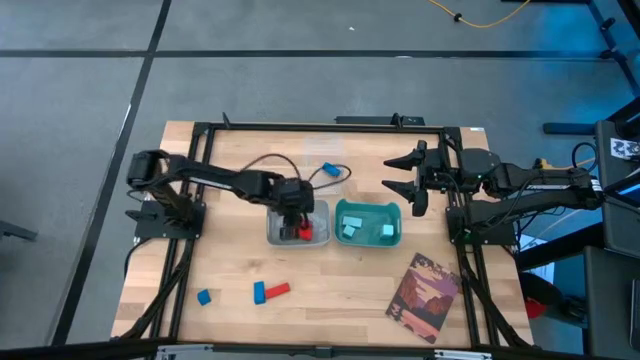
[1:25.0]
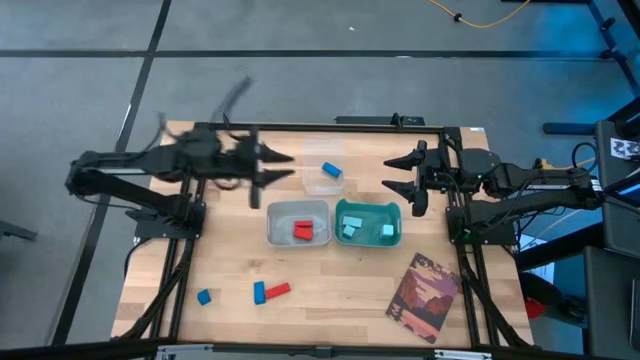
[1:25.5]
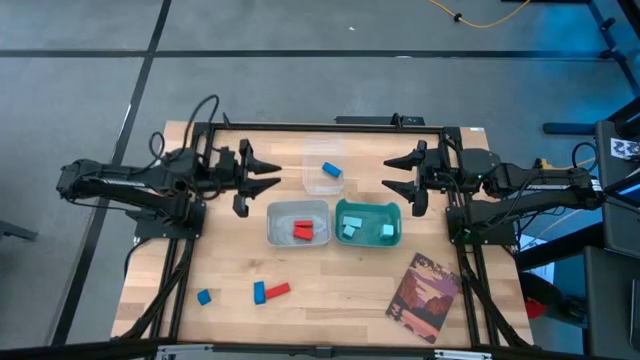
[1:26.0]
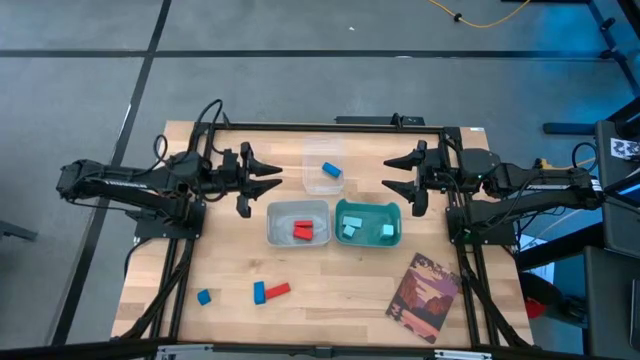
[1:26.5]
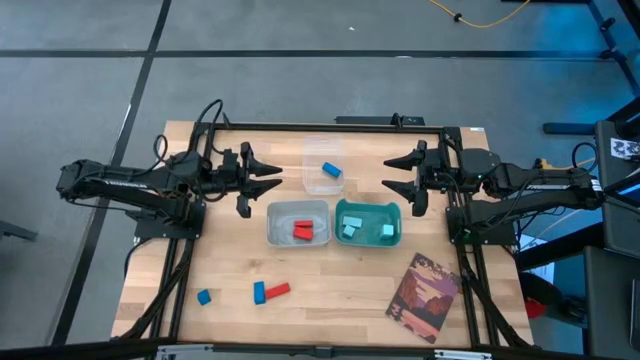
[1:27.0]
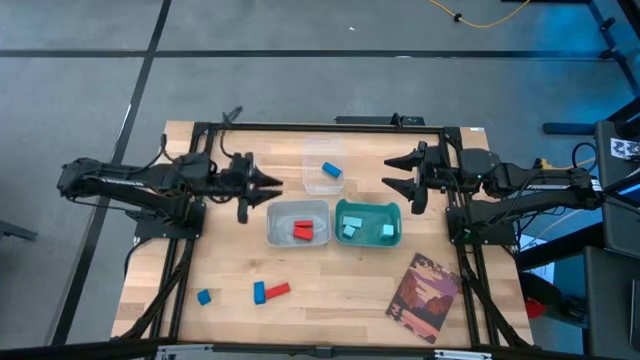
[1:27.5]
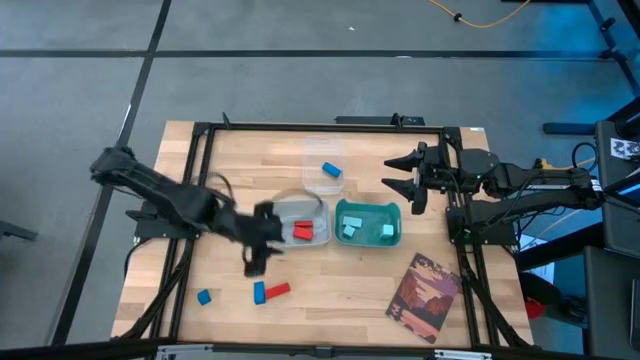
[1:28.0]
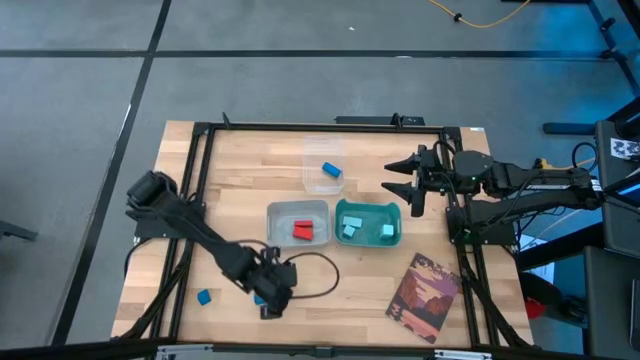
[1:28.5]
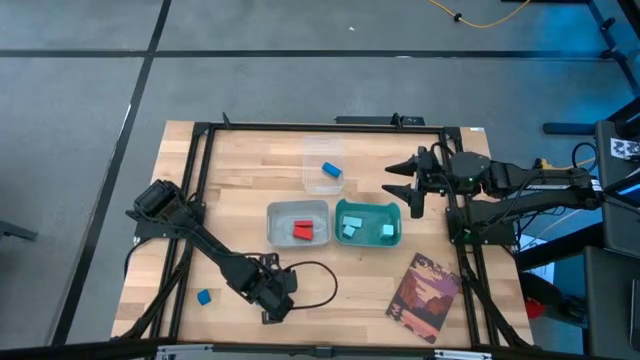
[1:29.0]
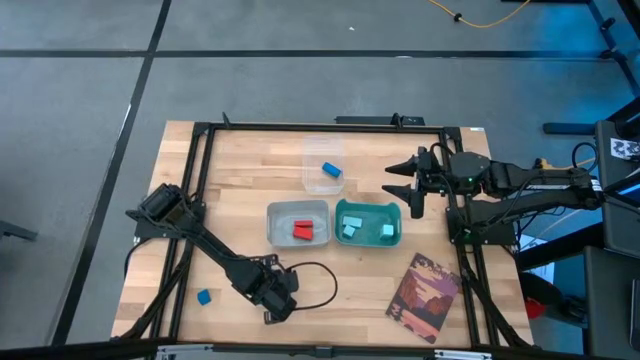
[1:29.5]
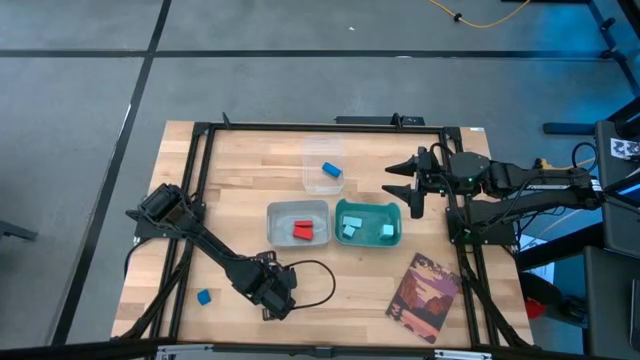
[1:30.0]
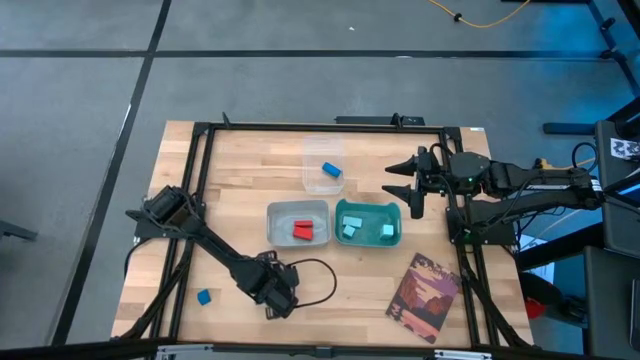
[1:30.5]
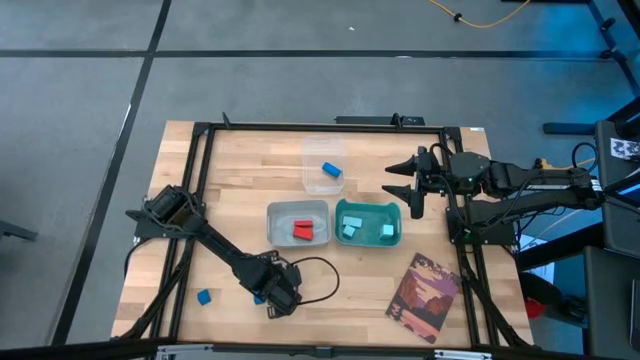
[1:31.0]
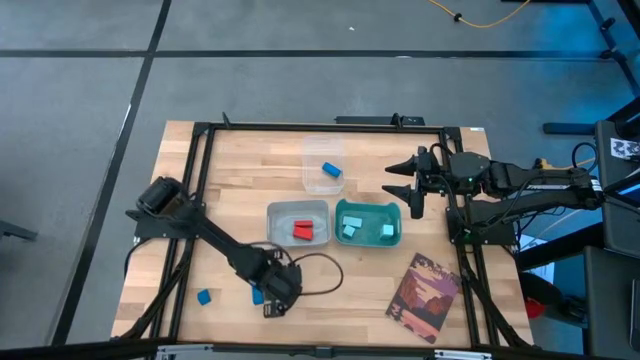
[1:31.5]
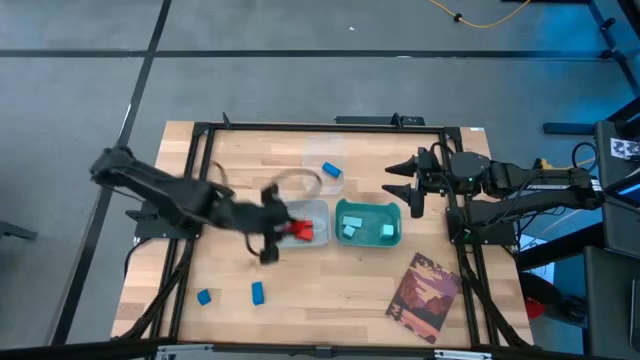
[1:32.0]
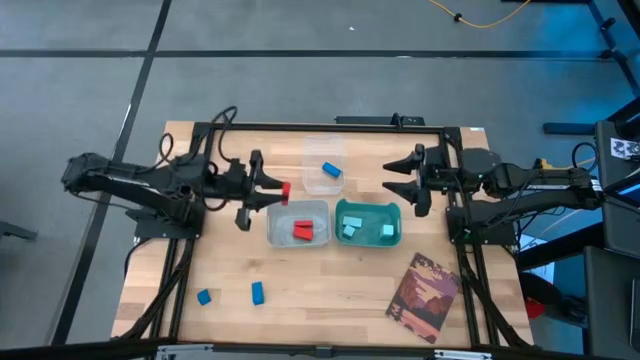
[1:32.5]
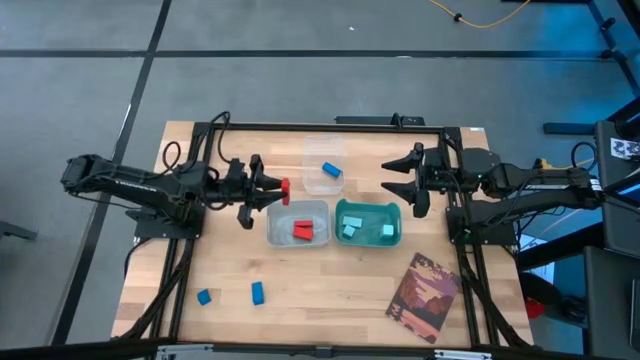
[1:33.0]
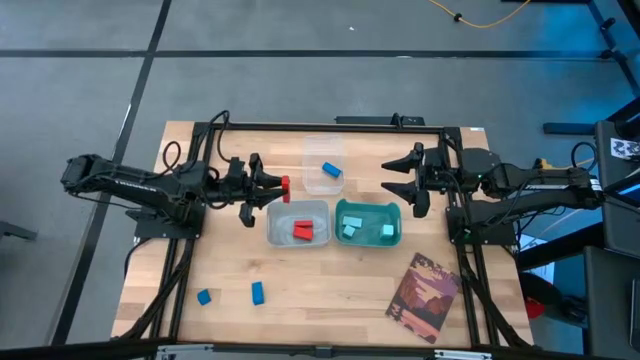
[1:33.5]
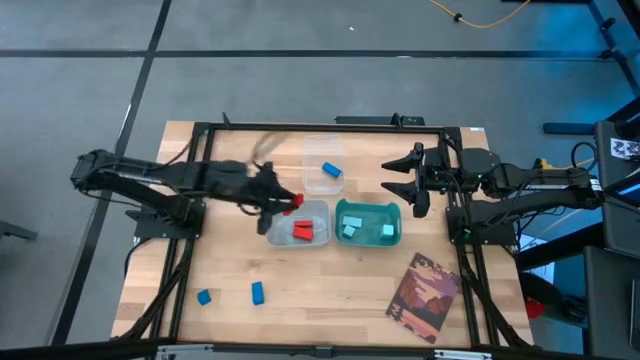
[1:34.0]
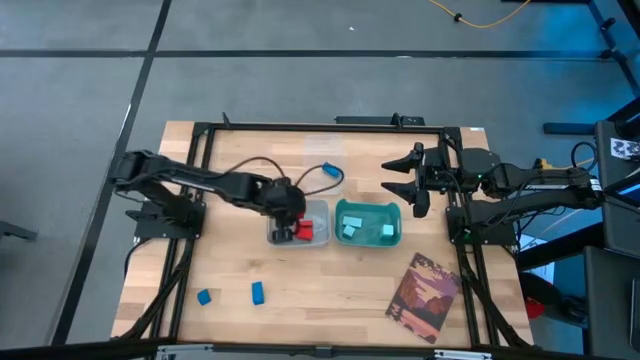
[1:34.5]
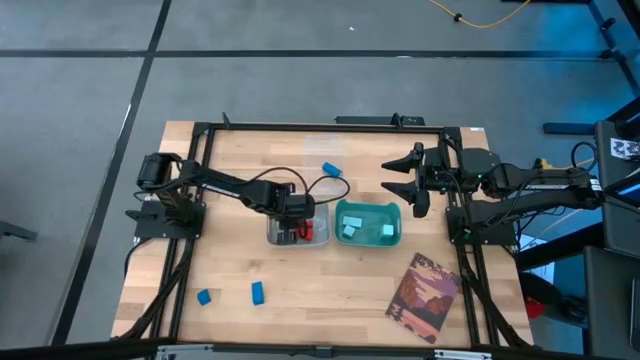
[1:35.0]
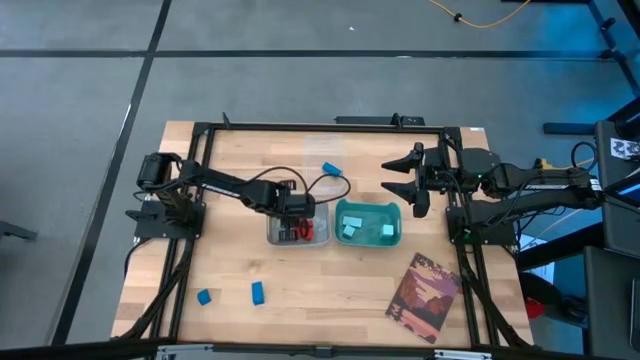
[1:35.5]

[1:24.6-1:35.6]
Task: Sort & place blocks by color
Put the red block into the gray bin

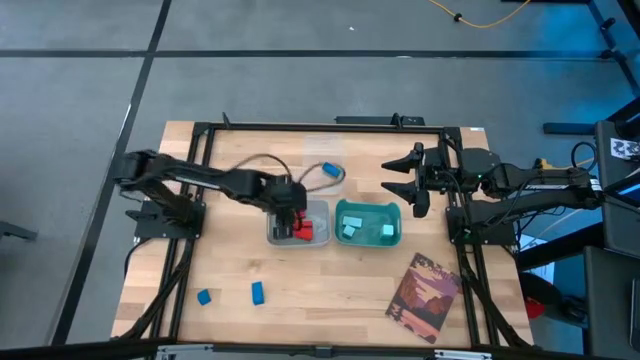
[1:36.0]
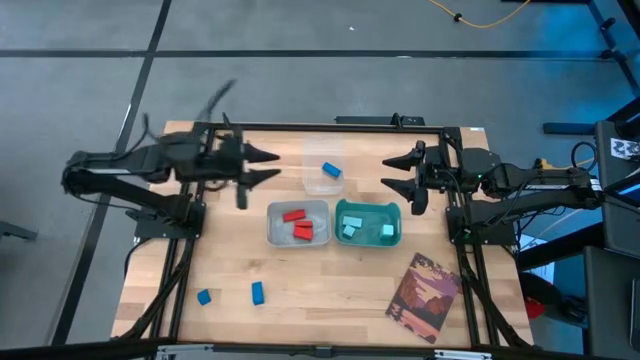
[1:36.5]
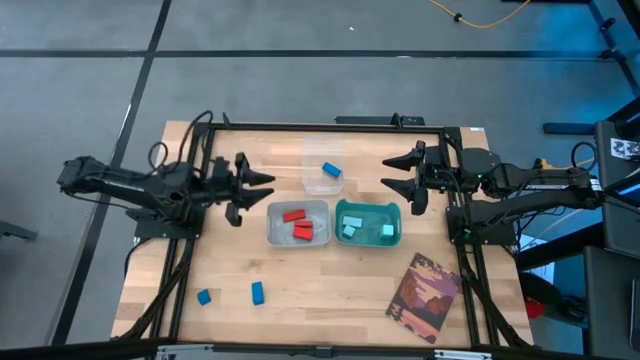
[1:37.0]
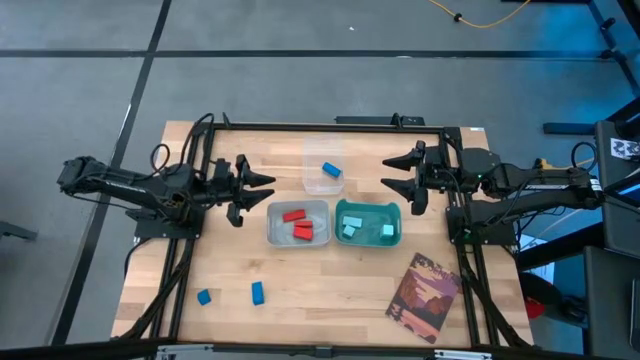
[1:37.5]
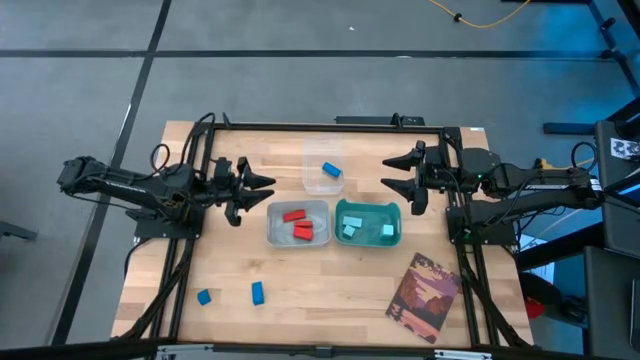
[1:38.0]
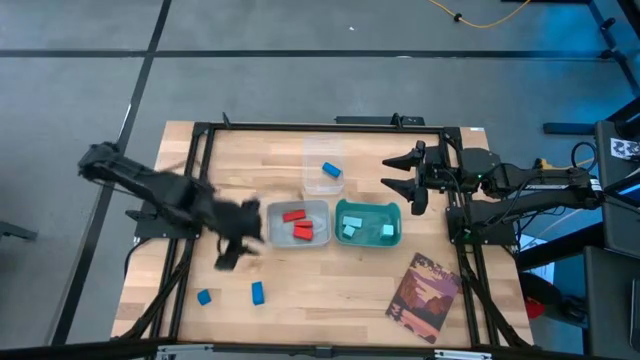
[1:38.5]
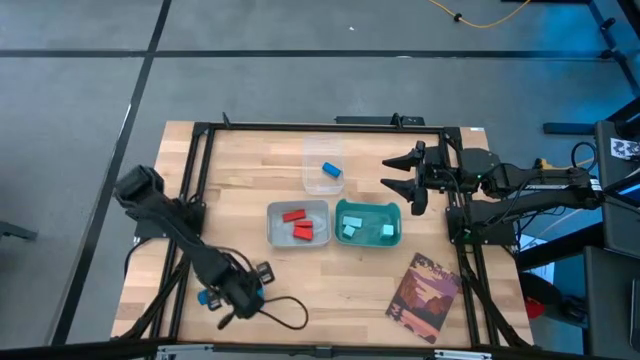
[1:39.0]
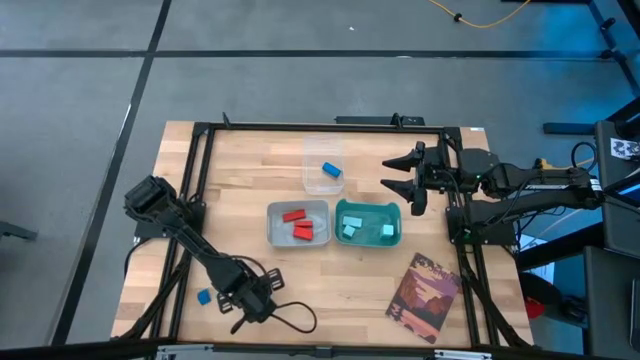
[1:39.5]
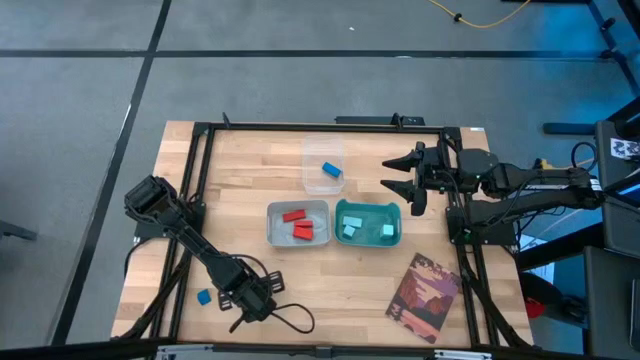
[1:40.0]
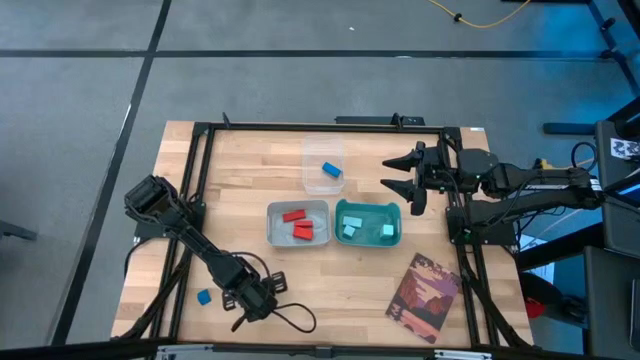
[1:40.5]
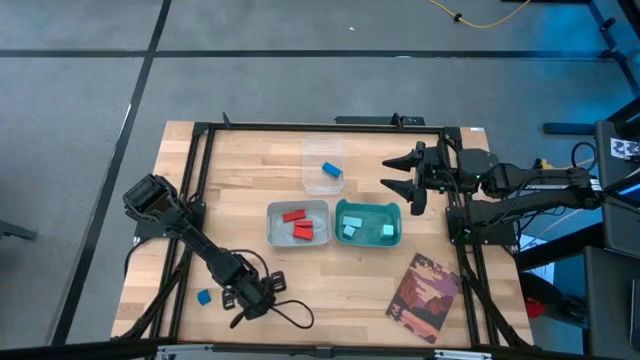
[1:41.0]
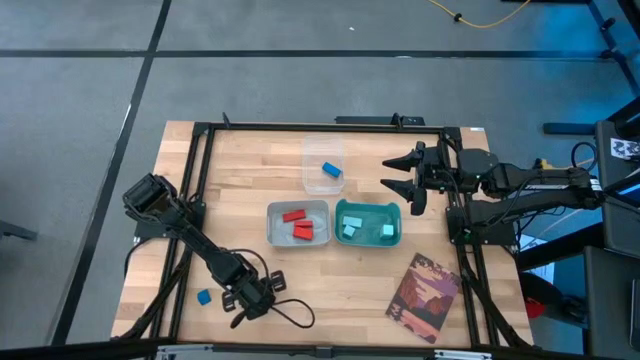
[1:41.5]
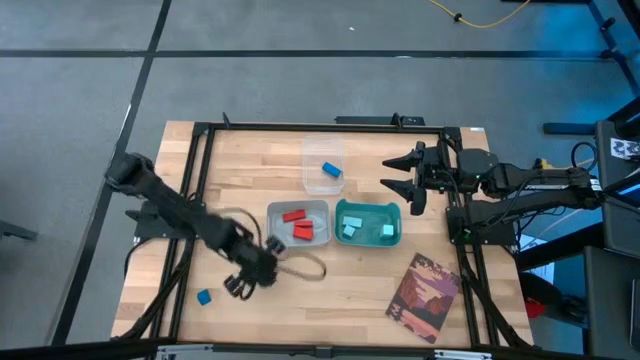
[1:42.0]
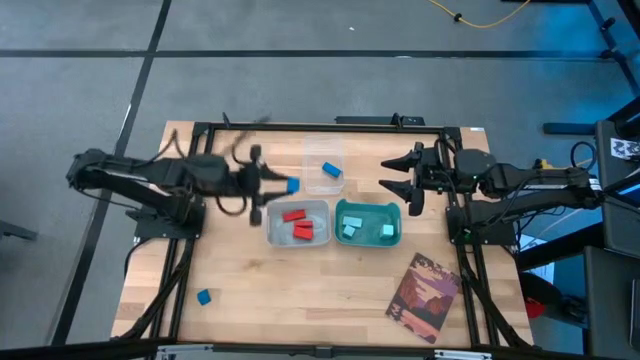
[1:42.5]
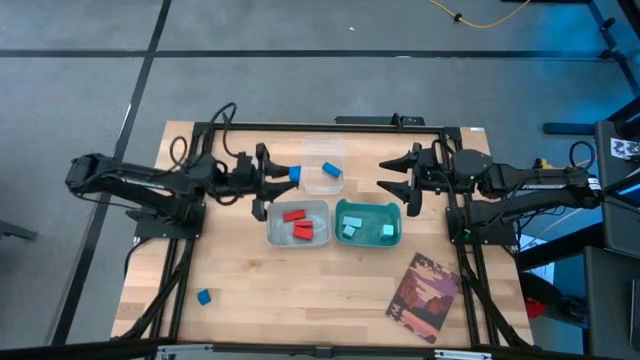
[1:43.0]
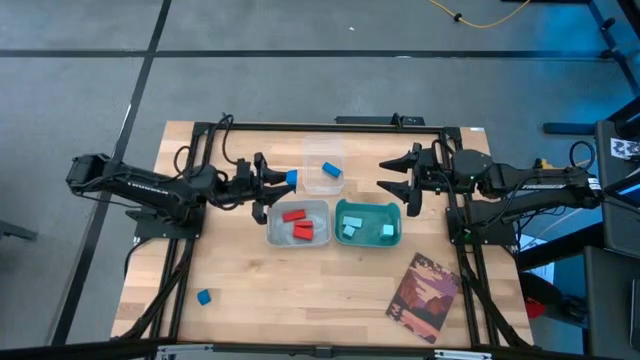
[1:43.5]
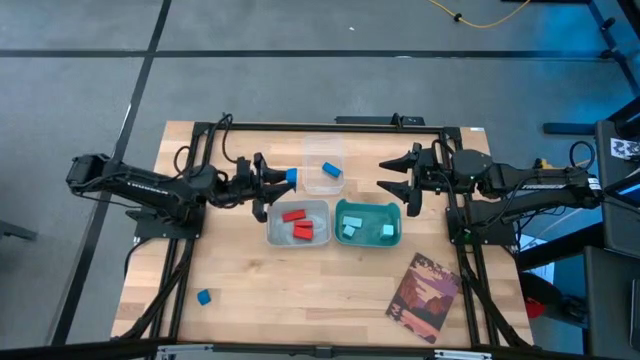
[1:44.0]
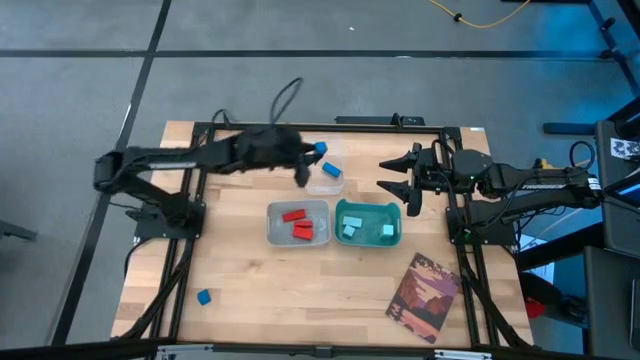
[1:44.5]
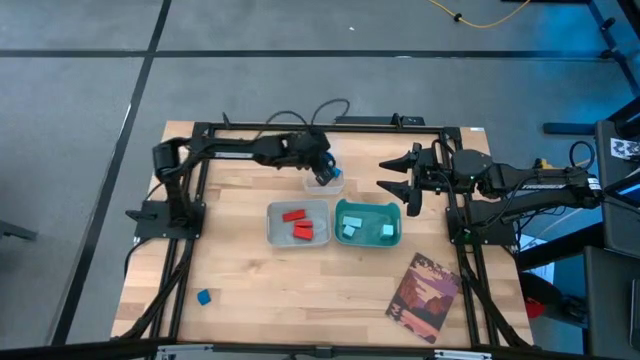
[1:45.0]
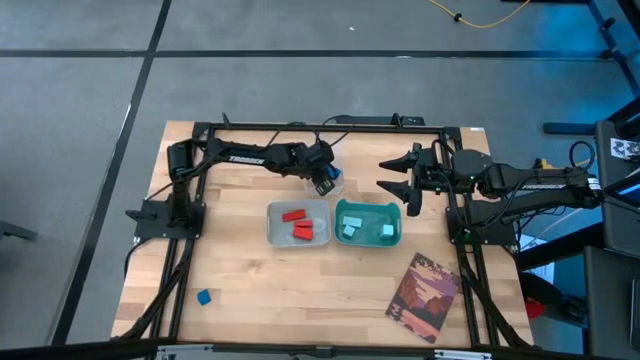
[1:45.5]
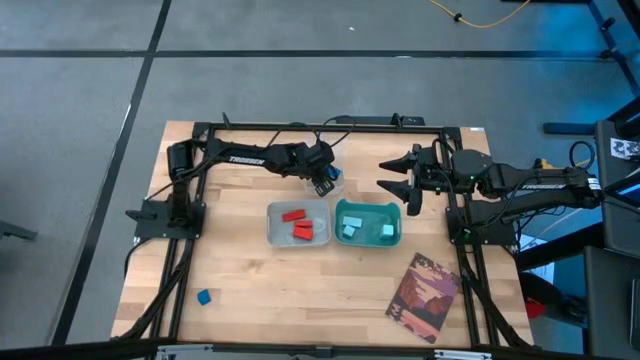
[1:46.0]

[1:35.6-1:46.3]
Put the right blue block into the transparent bin
